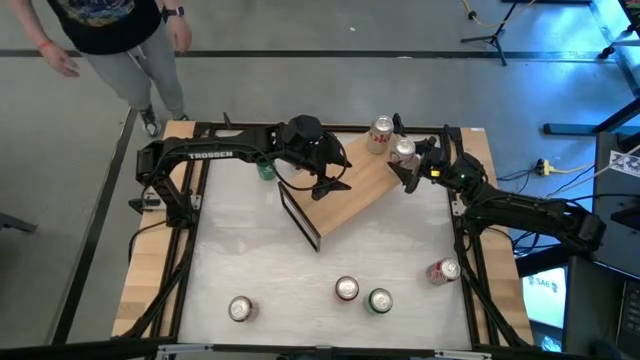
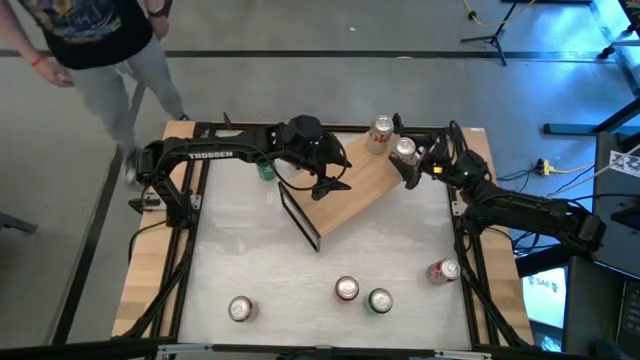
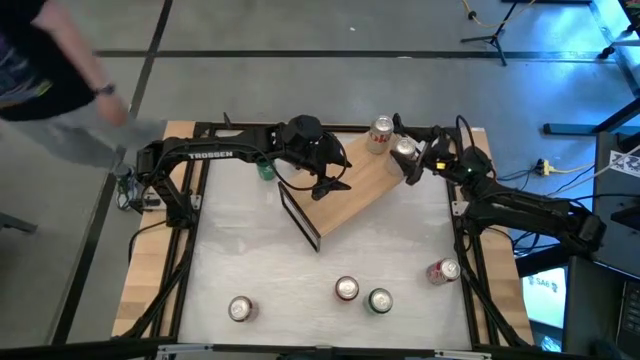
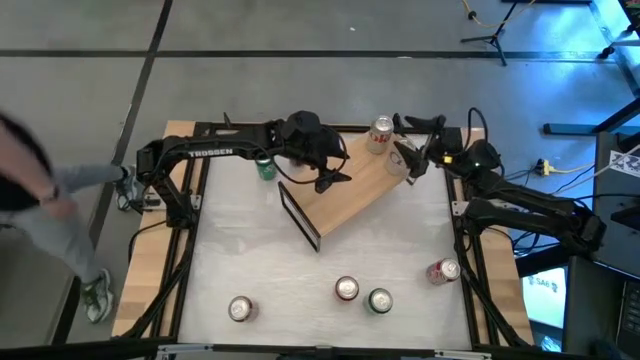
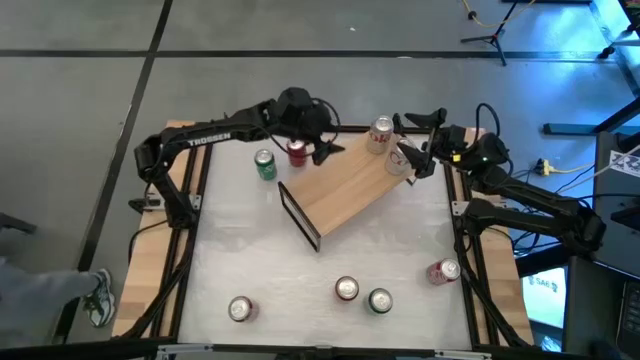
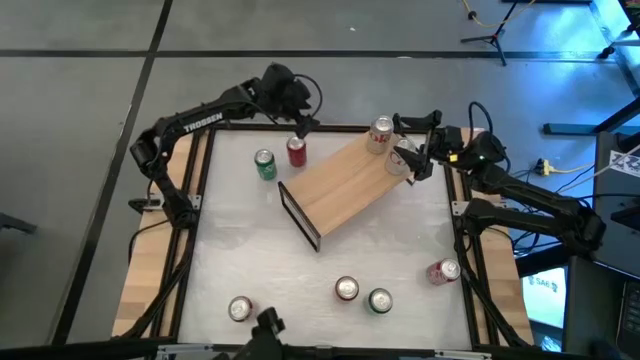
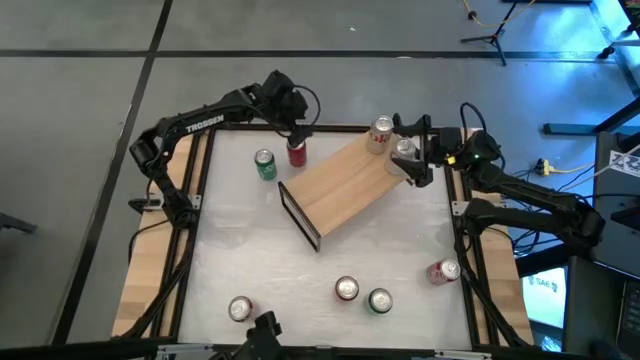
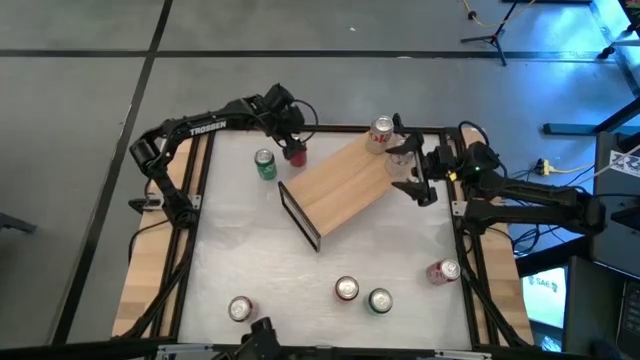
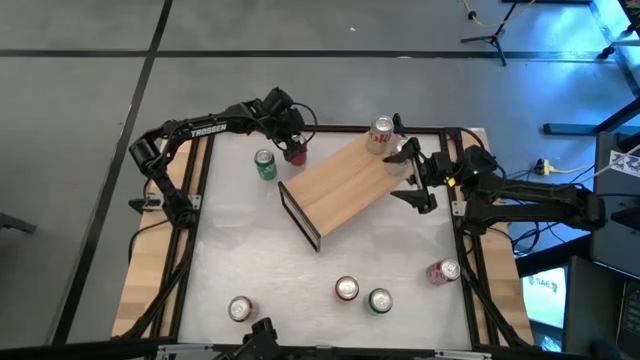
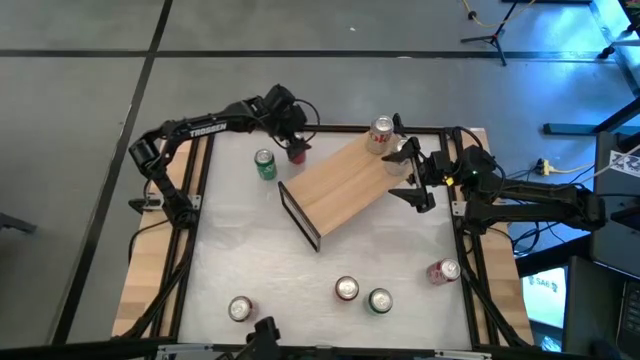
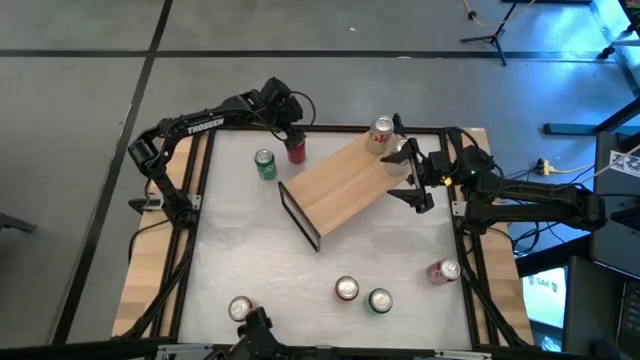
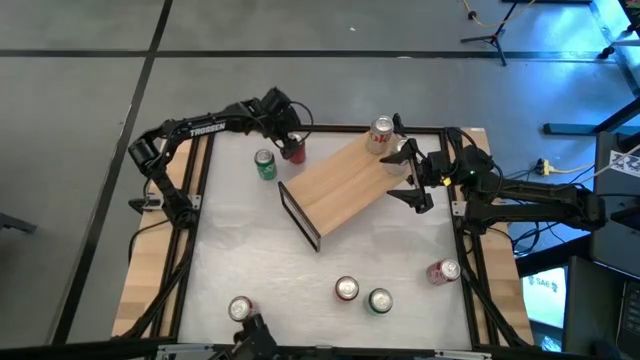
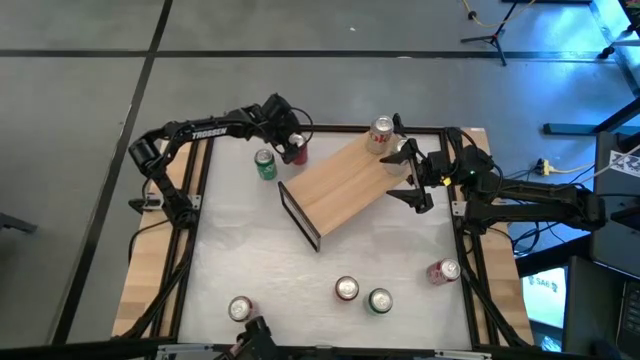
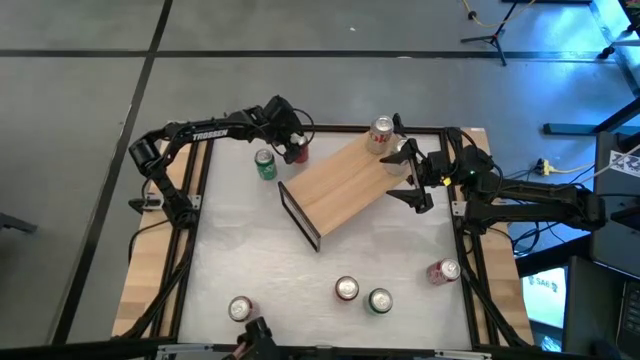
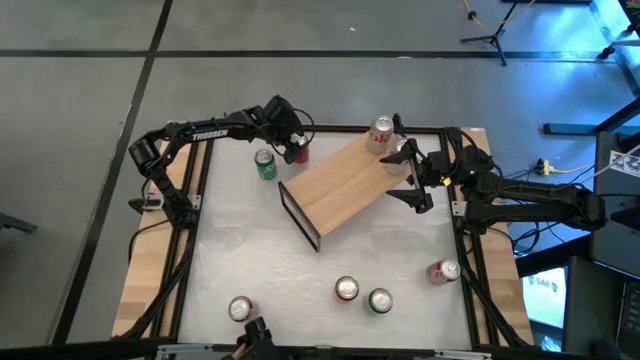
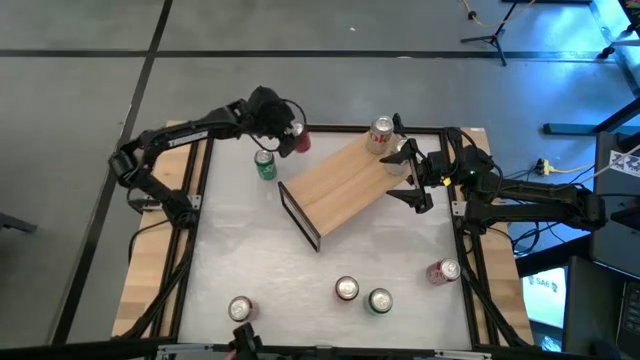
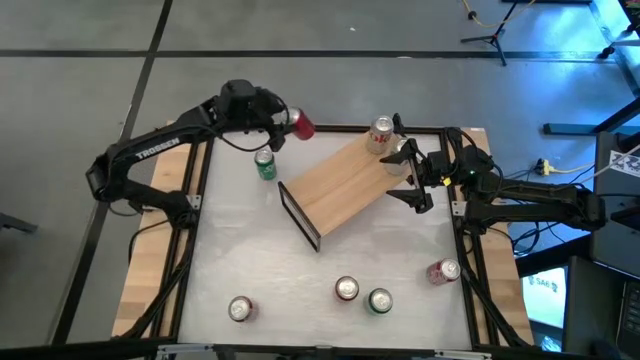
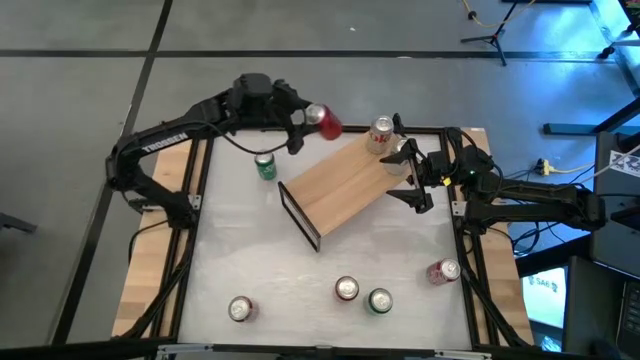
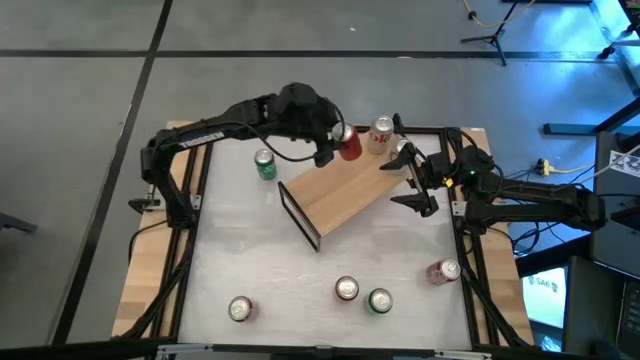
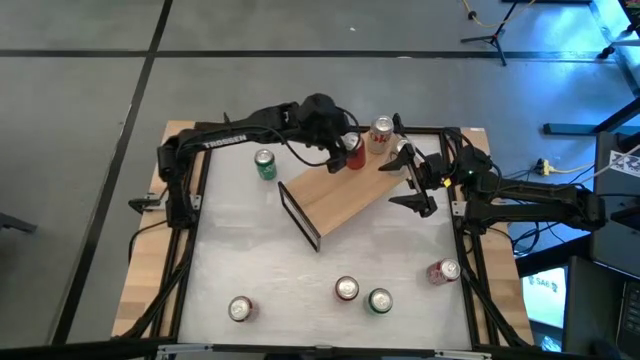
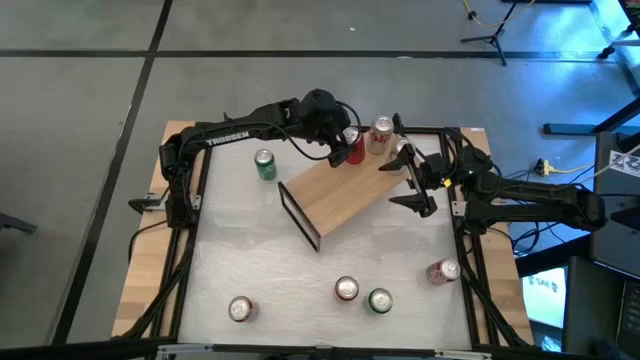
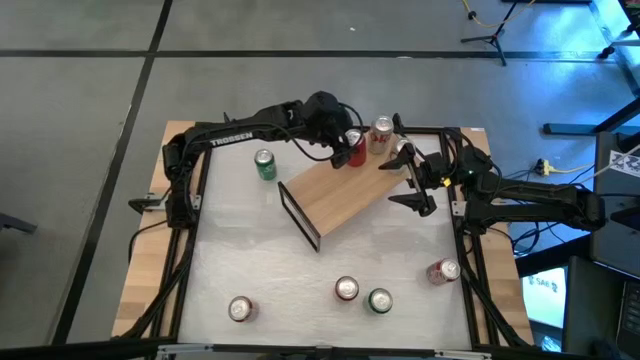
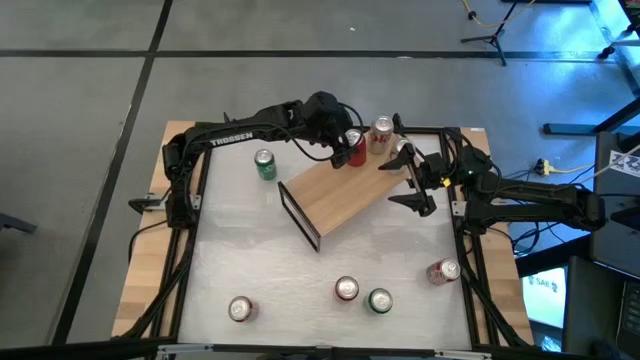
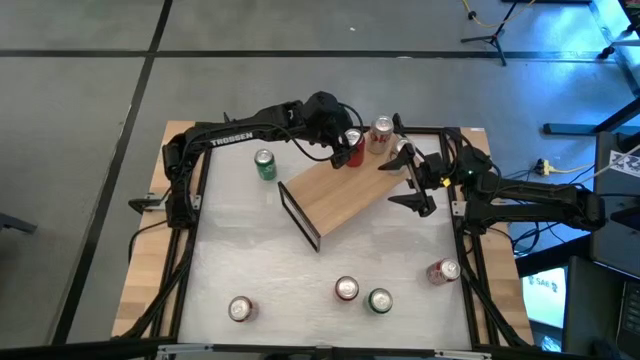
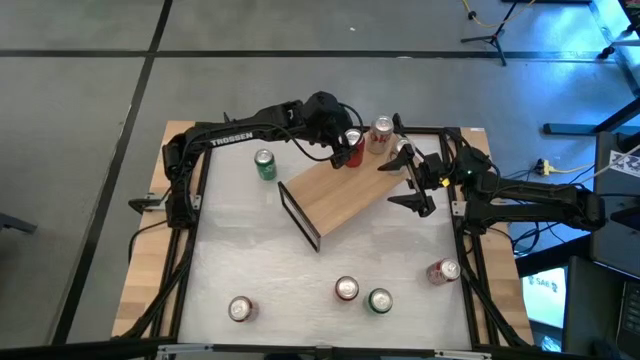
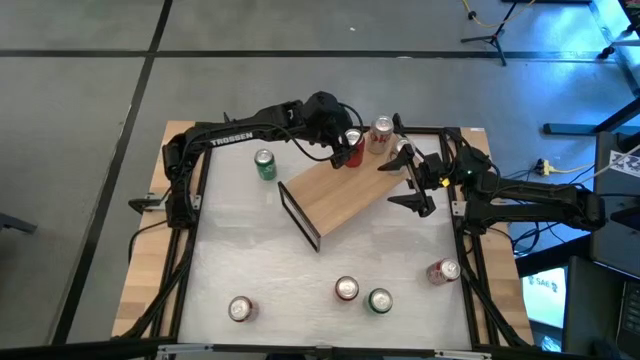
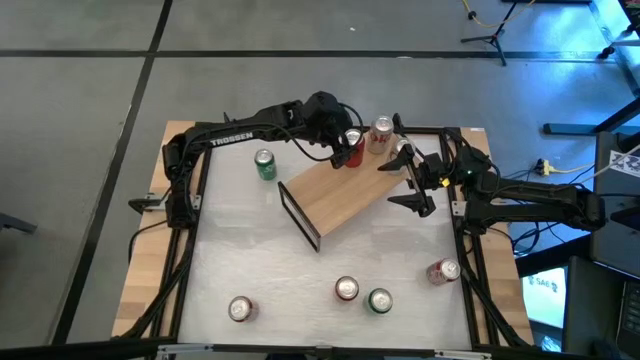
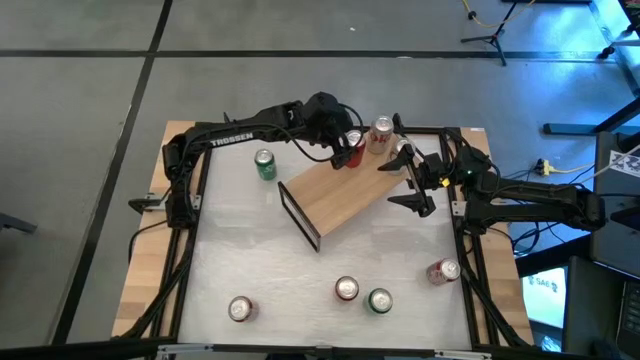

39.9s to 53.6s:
Task: Place canned beverage on shelf
Put the top red and black soda can on the shelf

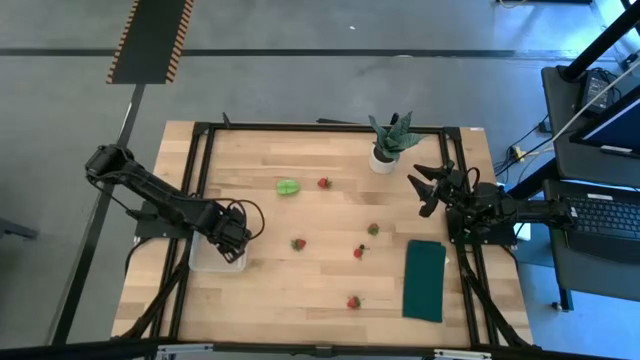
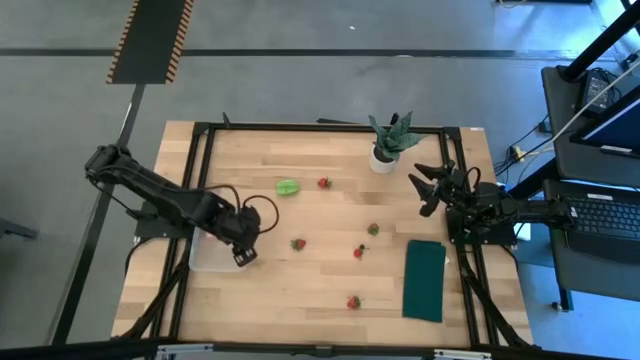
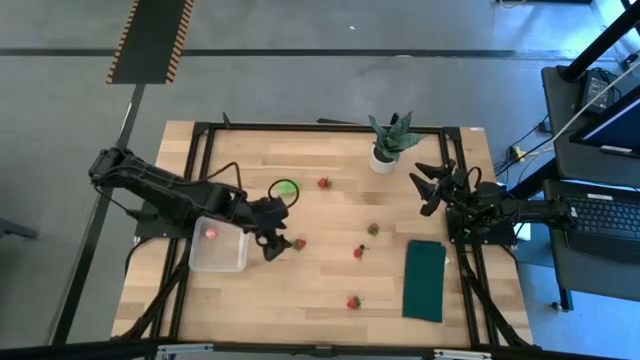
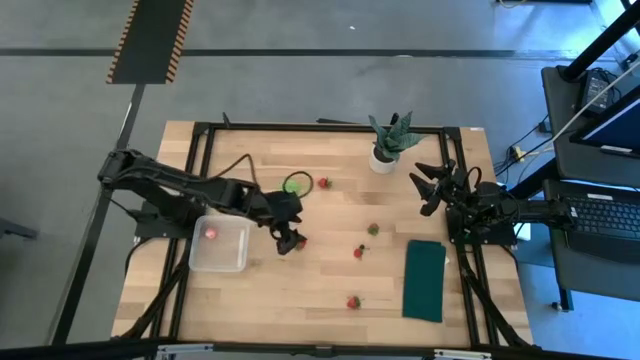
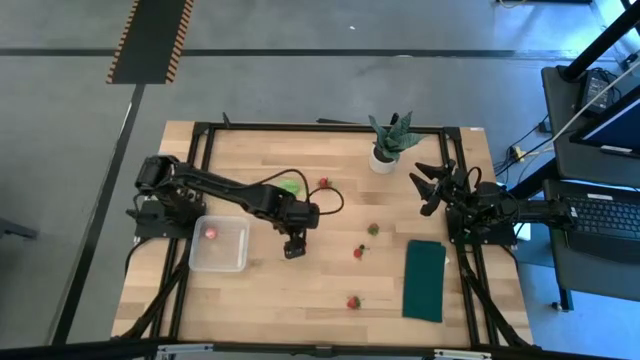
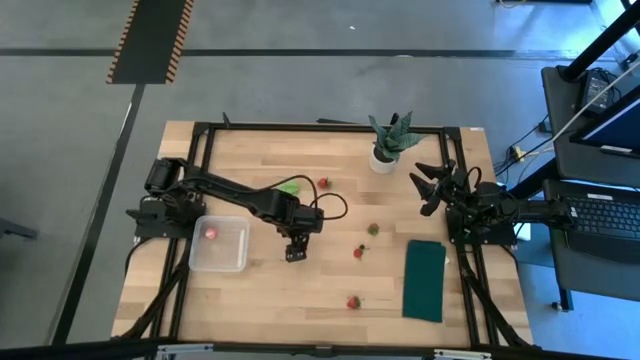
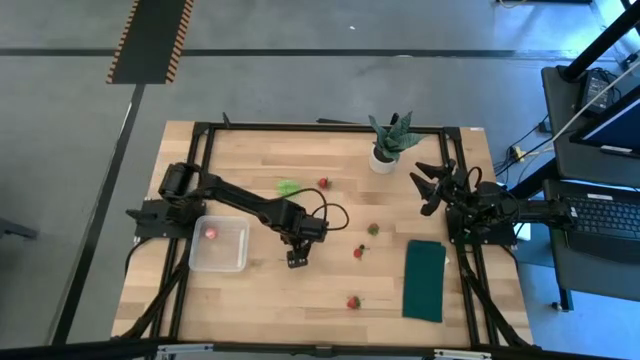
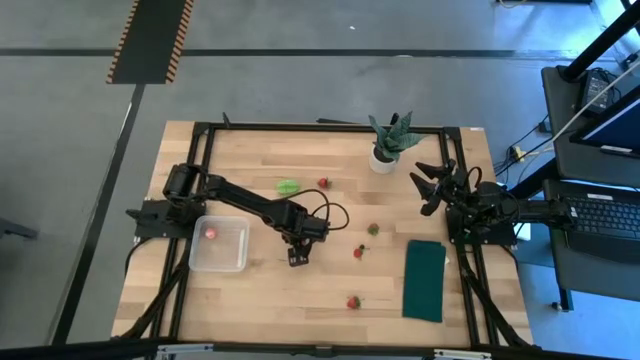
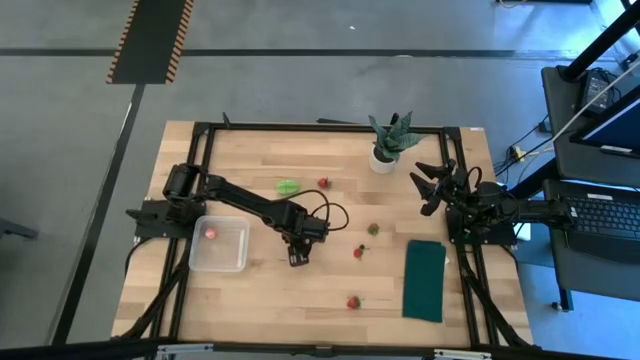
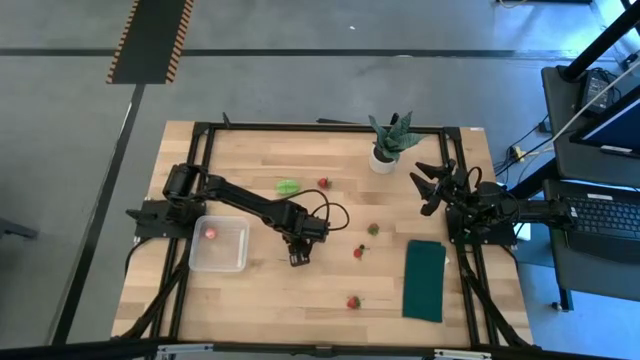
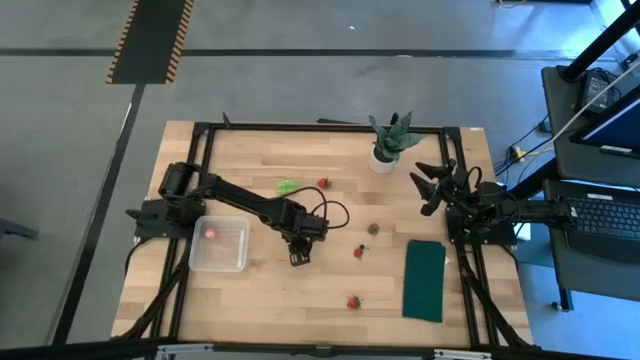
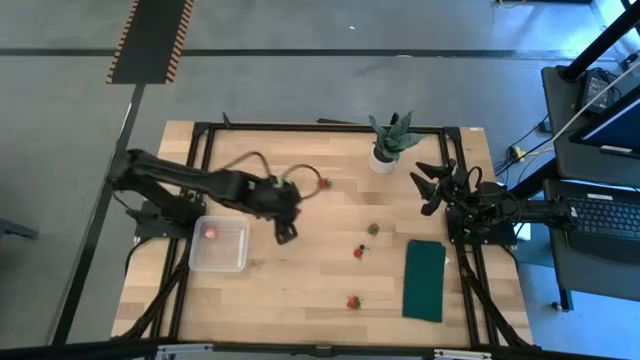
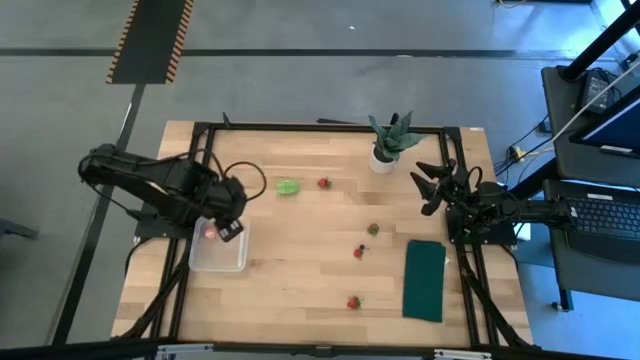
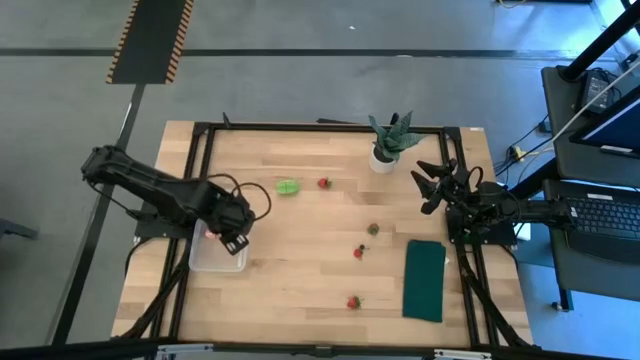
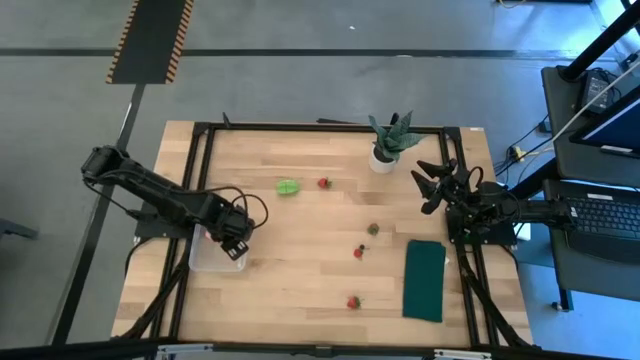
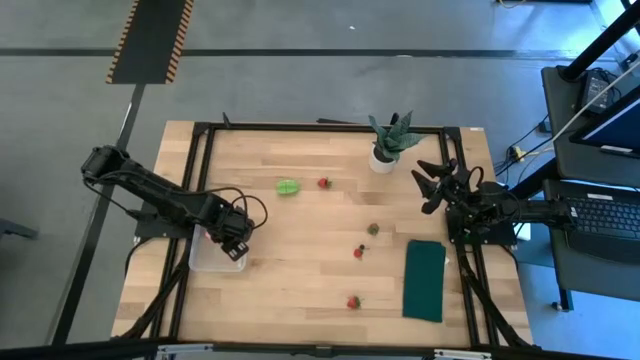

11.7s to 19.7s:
Task: Pick and placing Produce into tupperware
Put the red strawberry into the transparent bin
